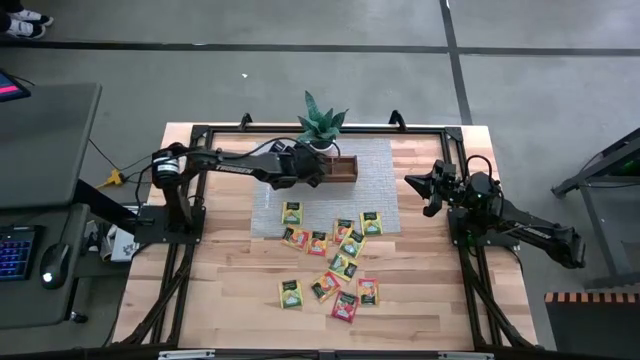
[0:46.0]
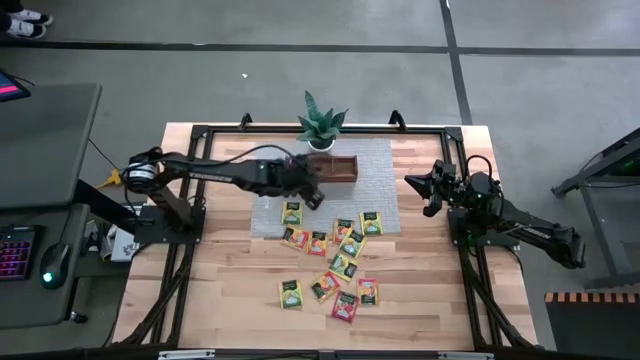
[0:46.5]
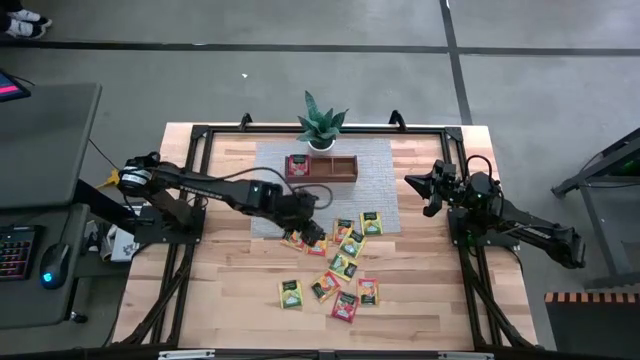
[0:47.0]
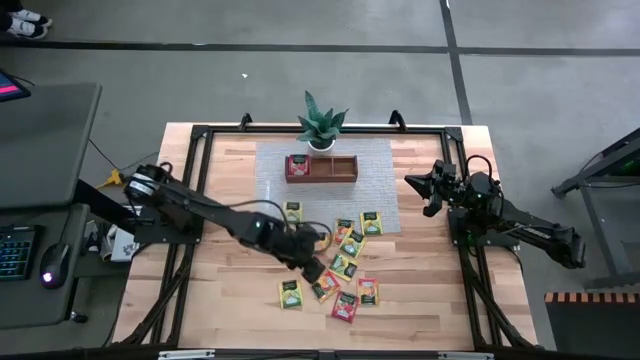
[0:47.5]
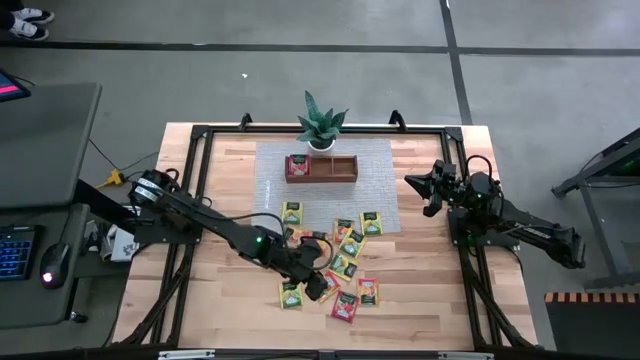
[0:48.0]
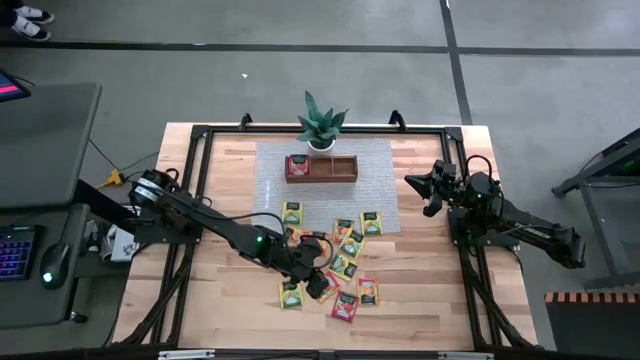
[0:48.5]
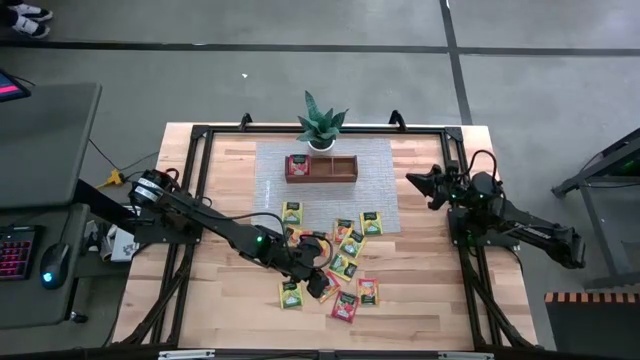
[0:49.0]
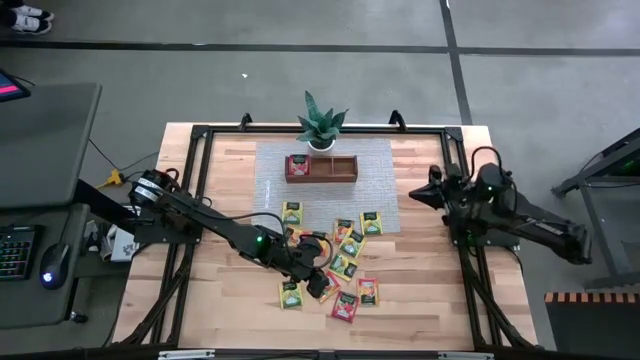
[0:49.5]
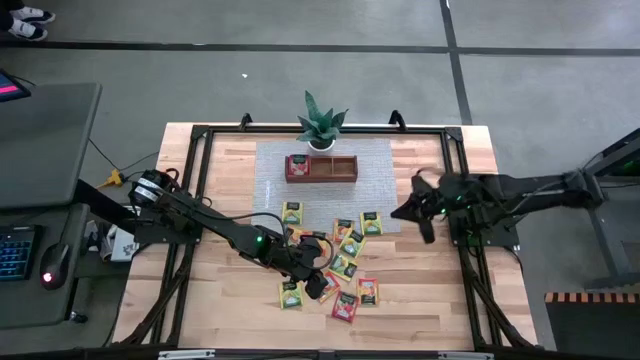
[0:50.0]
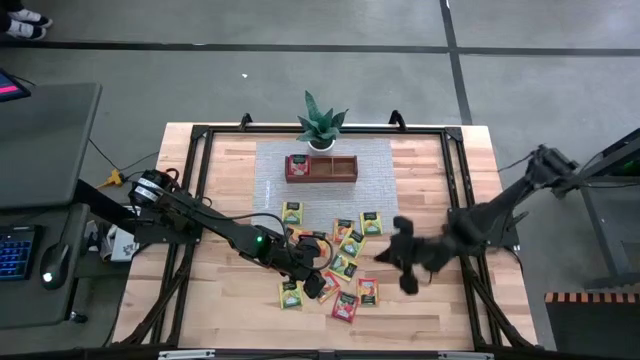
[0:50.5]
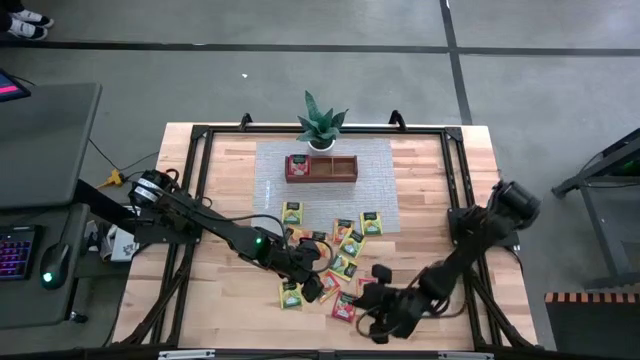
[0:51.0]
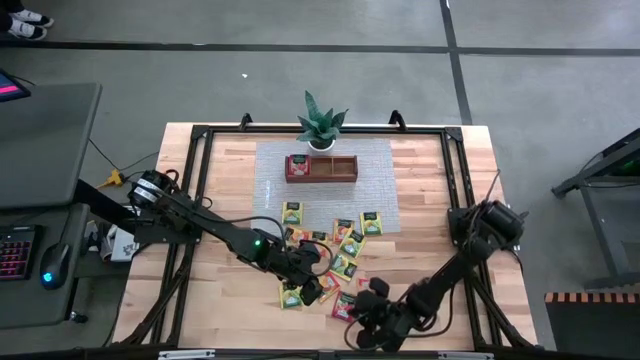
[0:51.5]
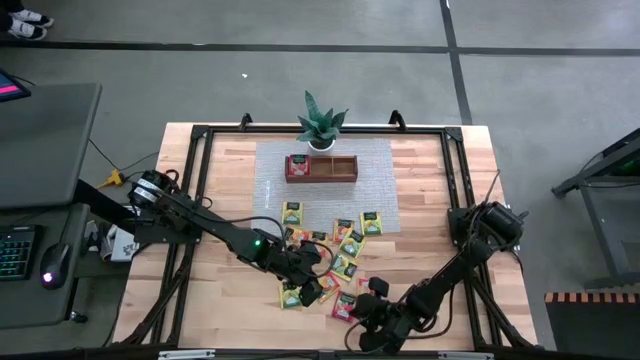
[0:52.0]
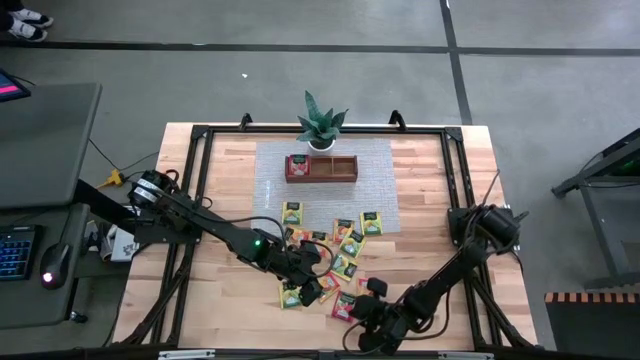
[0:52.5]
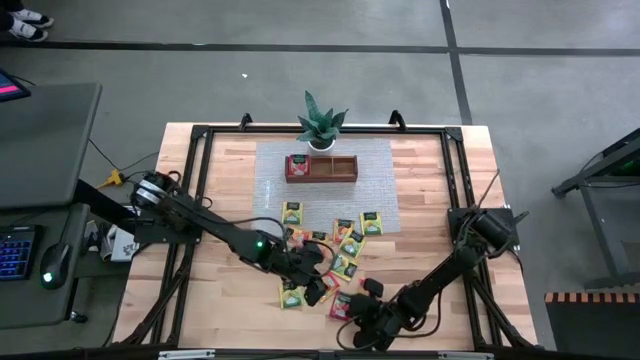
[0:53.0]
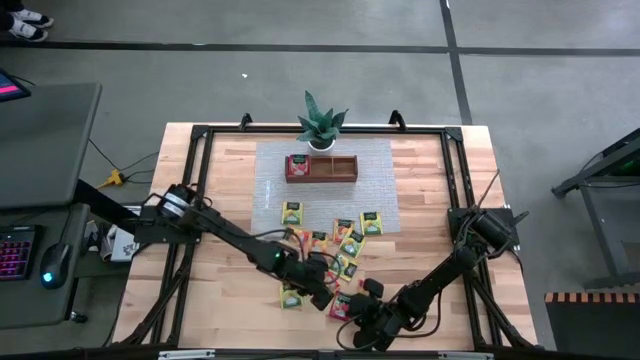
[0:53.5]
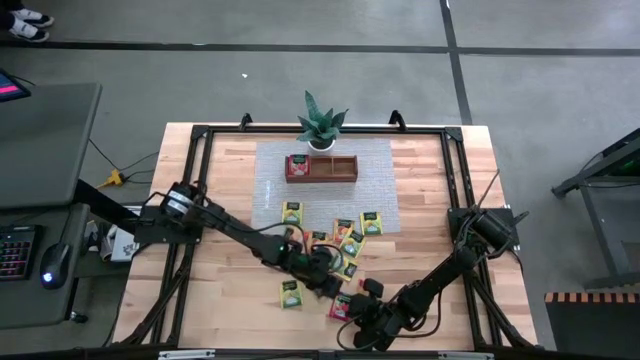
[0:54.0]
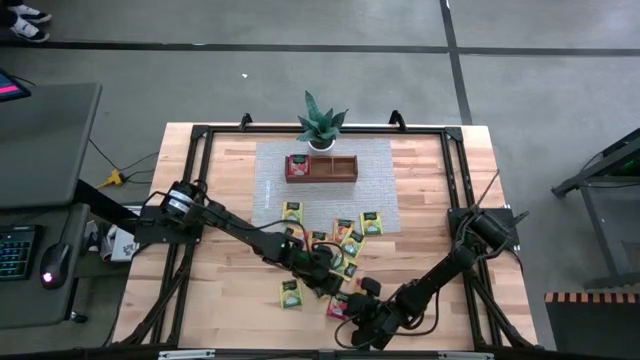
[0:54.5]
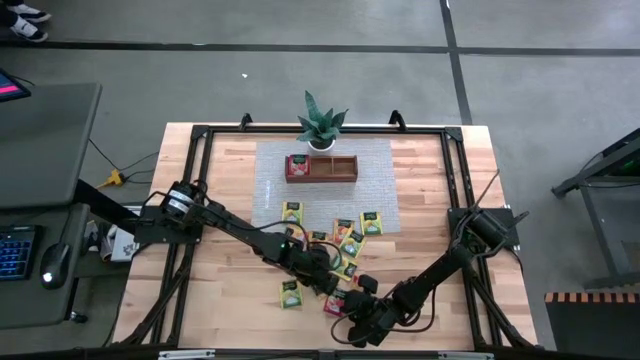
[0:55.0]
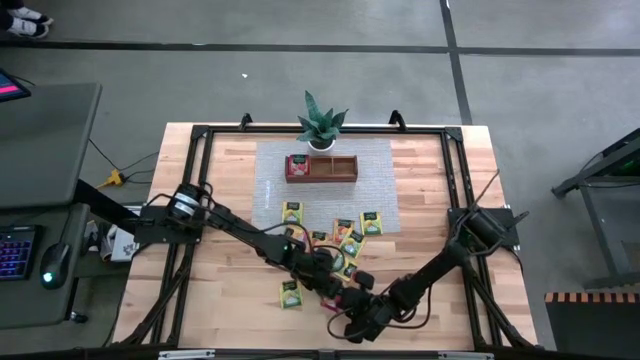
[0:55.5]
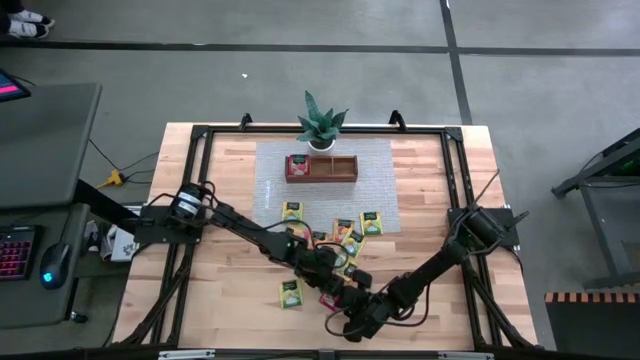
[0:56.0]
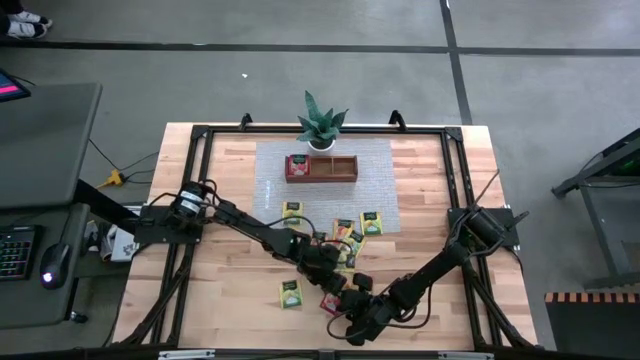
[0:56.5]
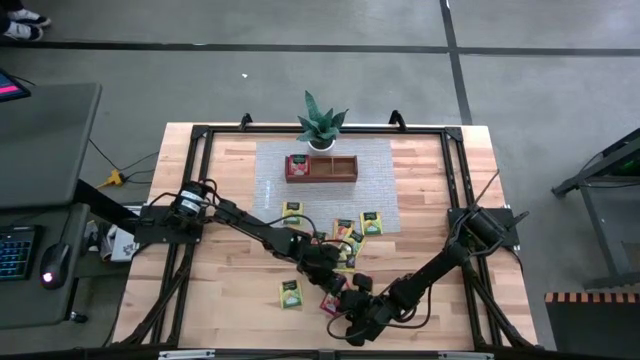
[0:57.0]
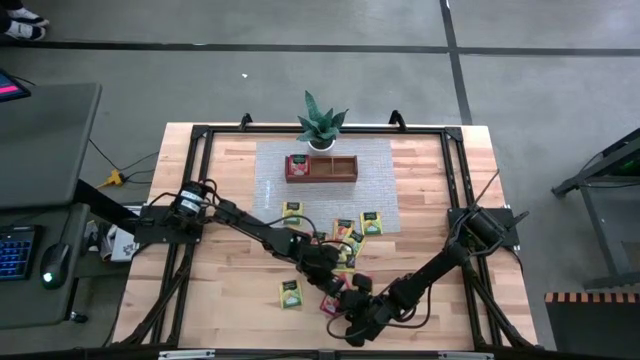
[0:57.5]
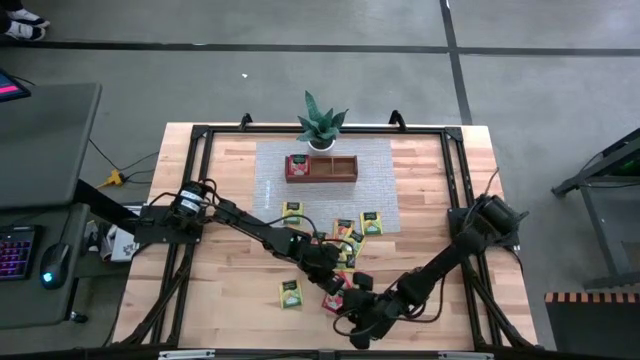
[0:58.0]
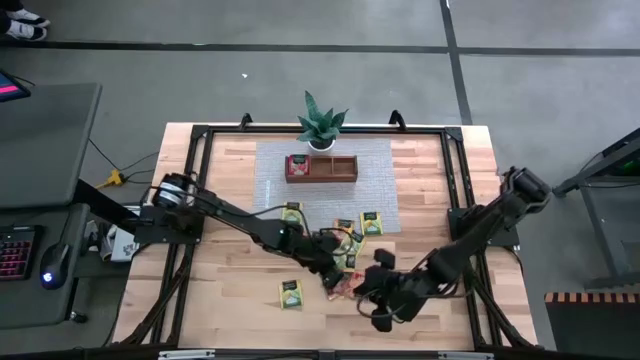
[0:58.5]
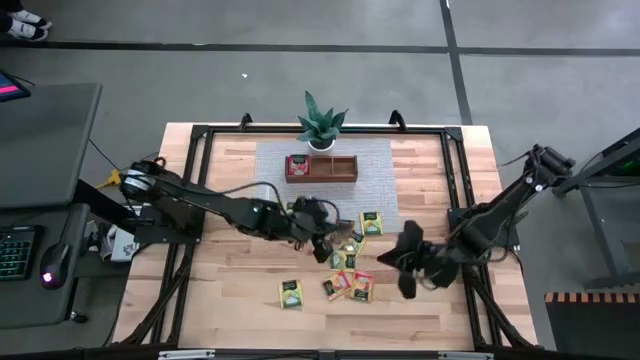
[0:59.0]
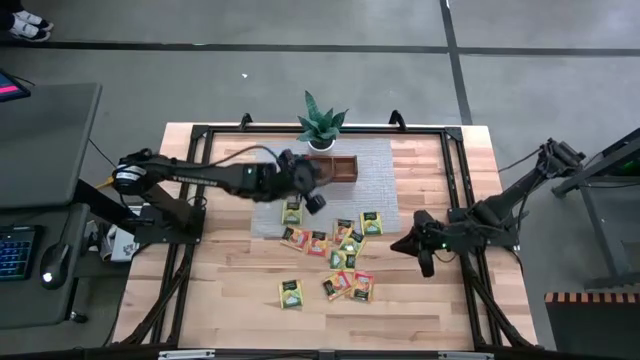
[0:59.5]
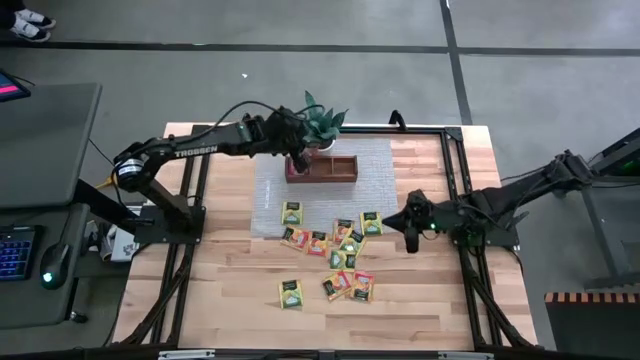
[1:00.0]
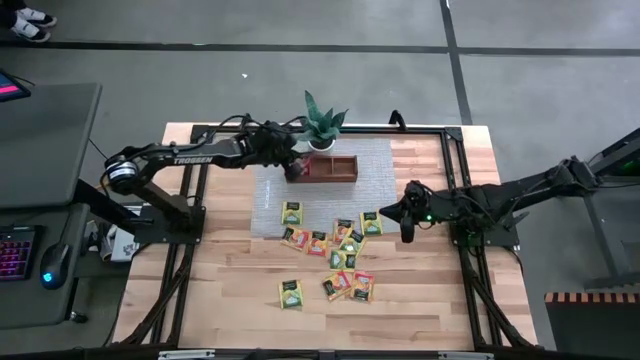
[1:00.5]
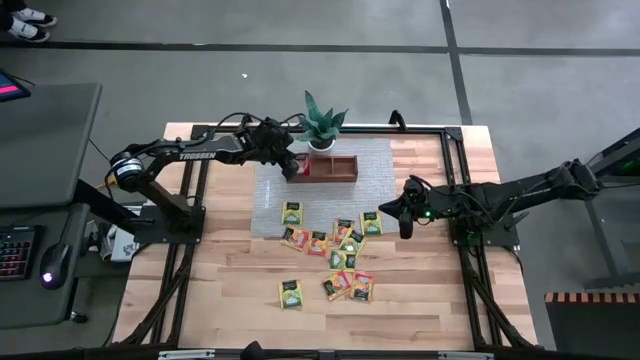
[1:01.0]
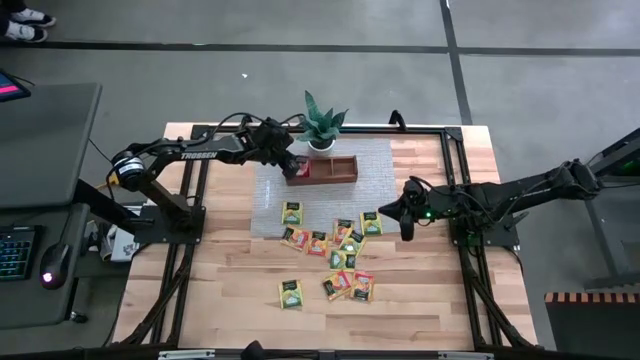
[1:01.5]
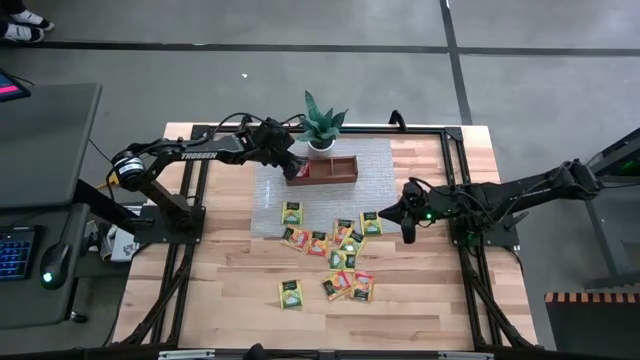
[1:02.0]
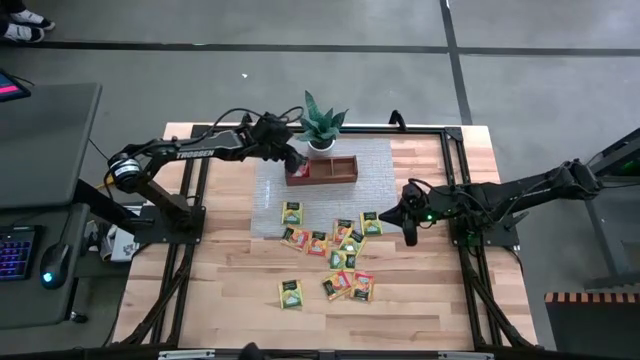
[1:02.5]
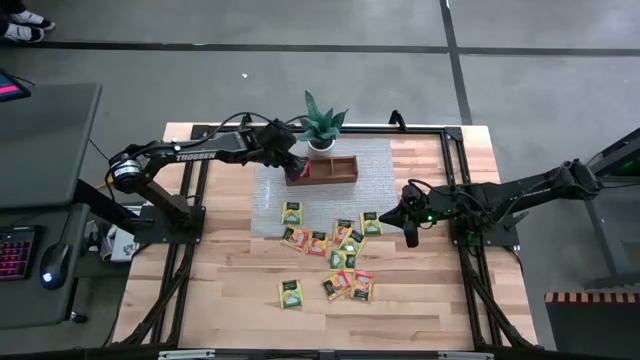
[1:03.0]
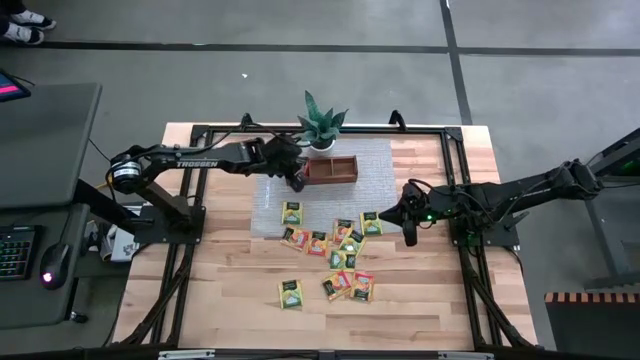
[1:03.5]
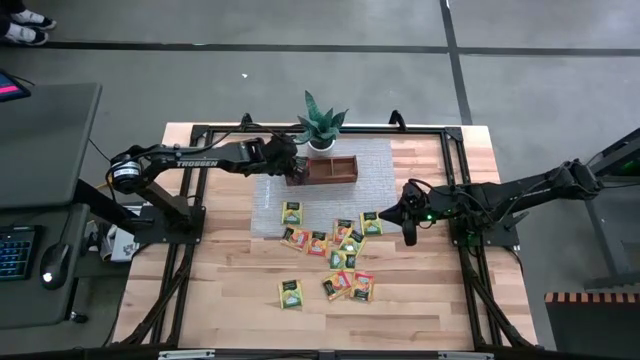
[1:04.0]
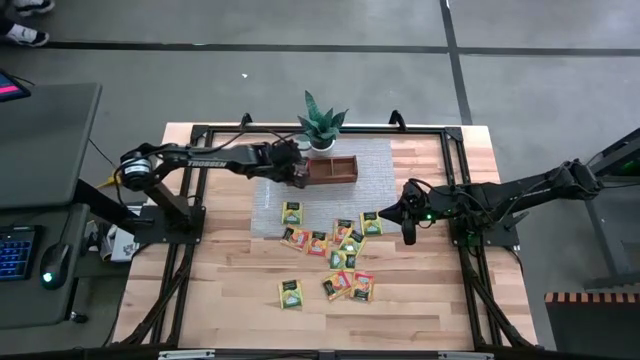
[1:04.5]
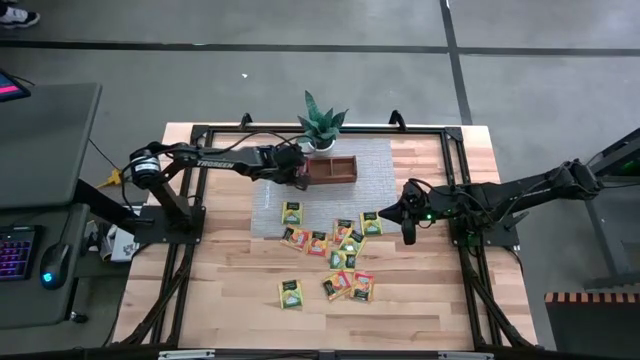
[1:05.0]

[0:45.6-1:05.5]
Task: Pick & Place Tea
Put the red tea bag into the left section of the wooden organizer

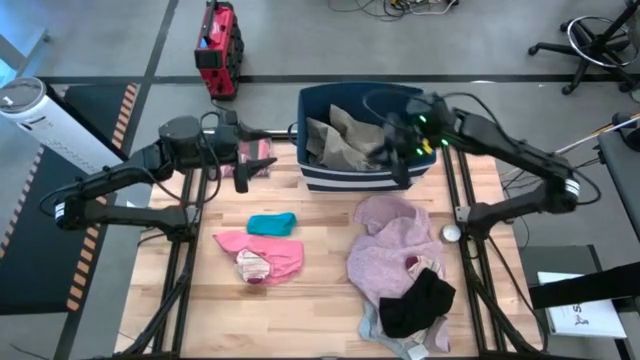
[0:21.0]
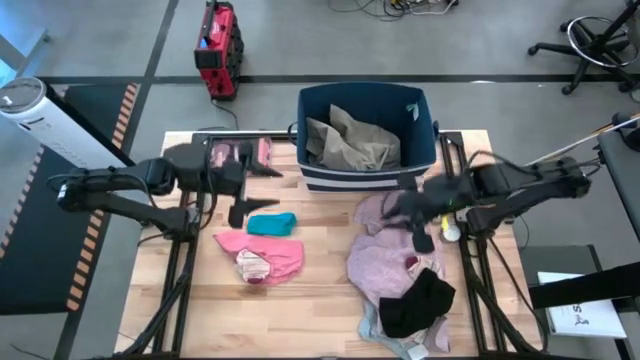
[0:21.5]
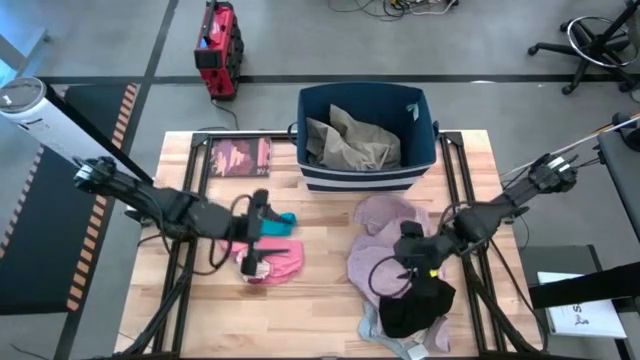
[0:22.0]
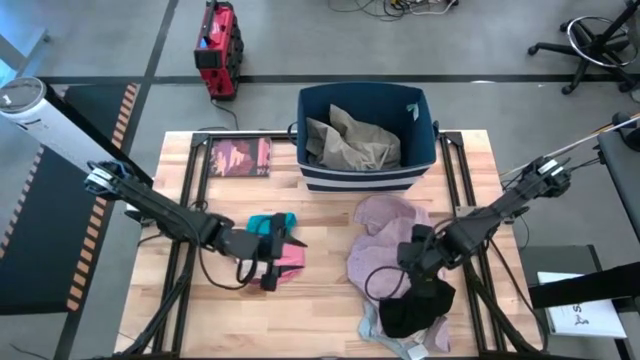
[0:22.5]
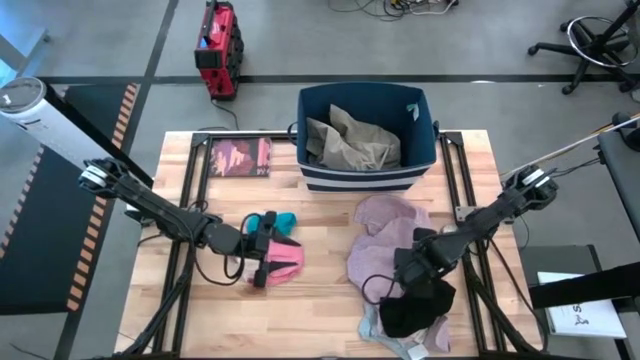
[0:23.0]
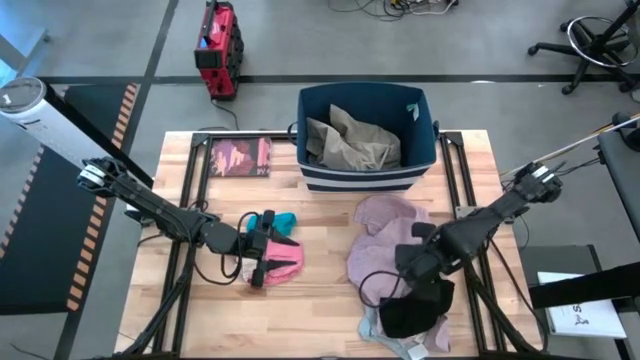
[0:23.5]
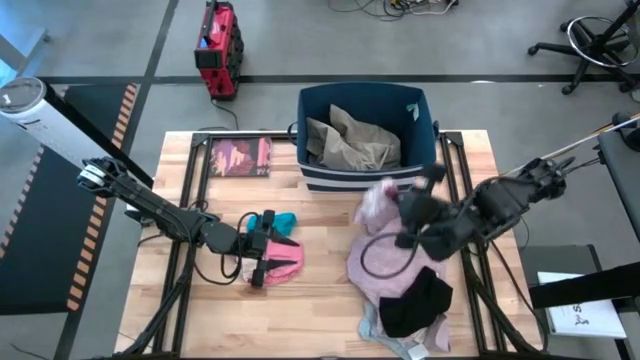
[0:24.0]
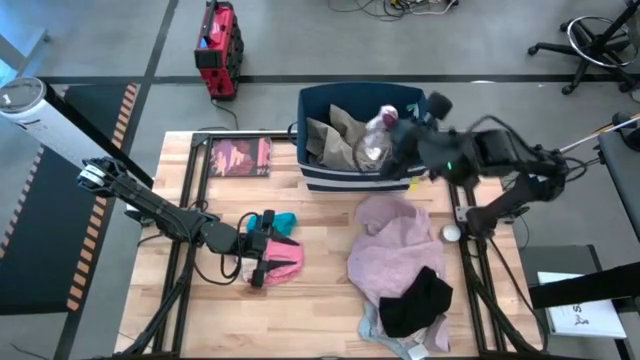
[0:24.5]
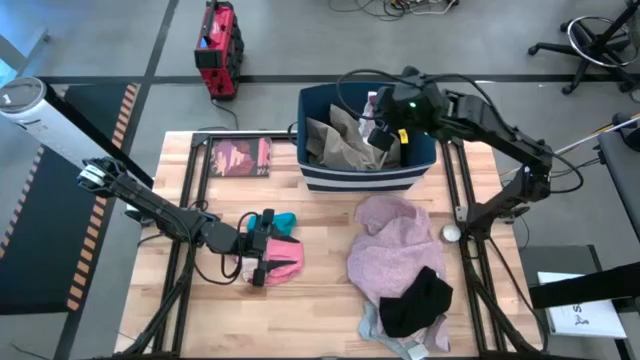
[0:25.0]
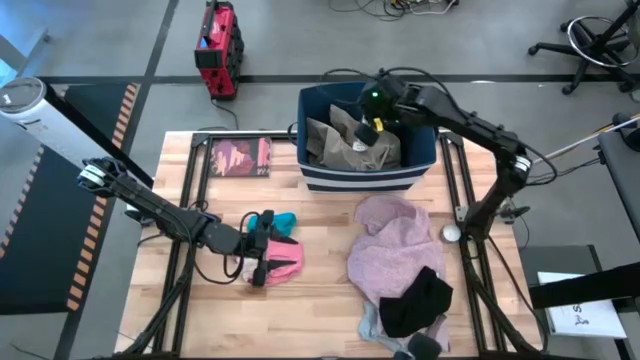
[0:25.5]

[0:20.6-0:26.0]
Task: Sort clothes
Put the right striped white sock into the blue laundry bin
